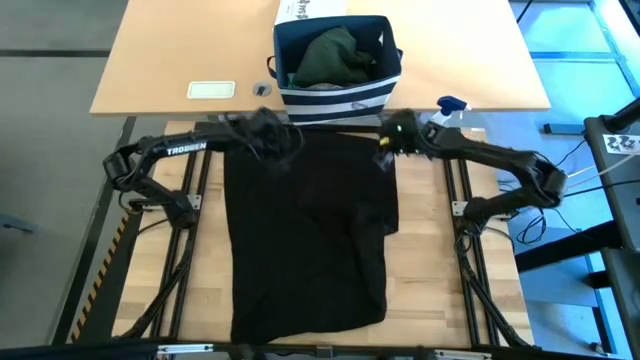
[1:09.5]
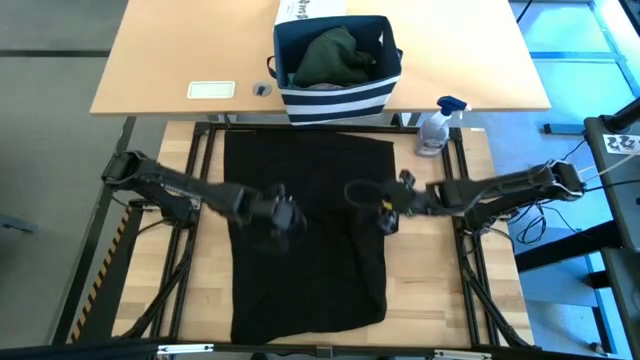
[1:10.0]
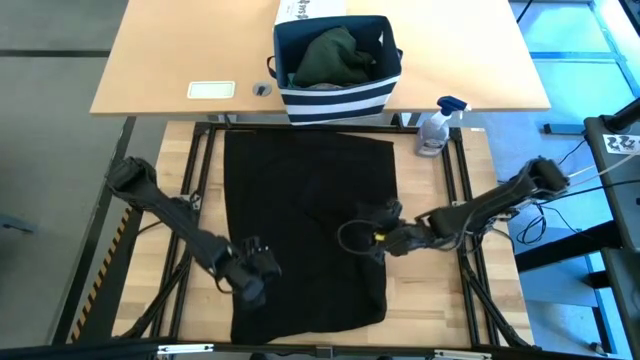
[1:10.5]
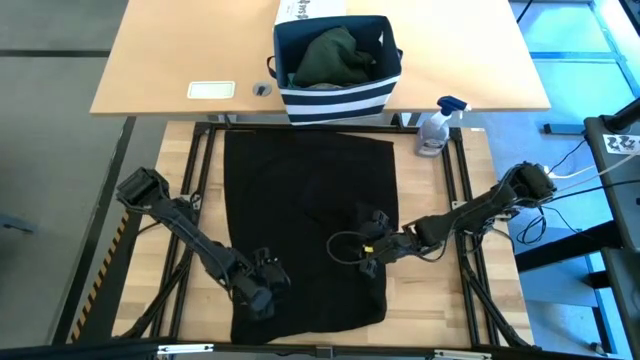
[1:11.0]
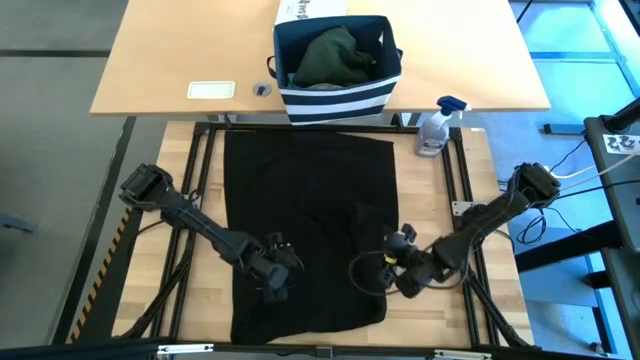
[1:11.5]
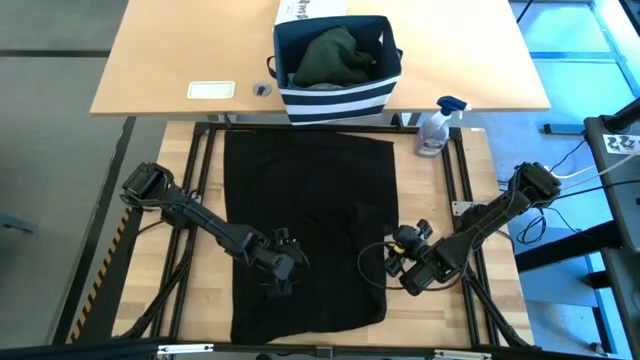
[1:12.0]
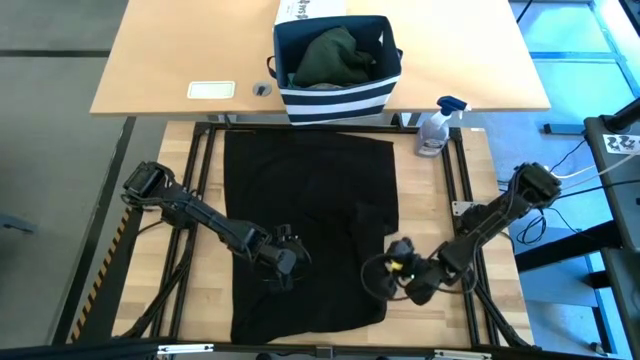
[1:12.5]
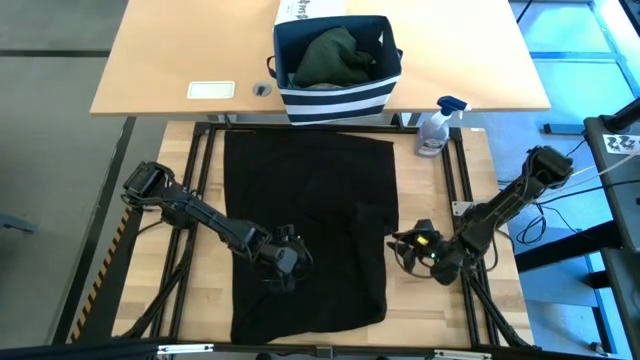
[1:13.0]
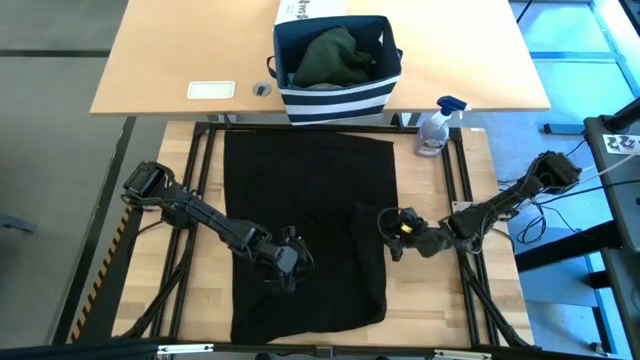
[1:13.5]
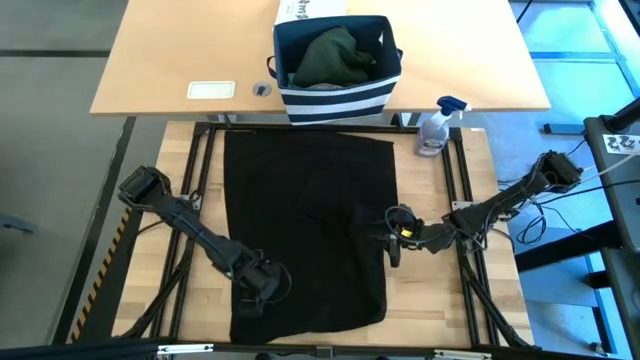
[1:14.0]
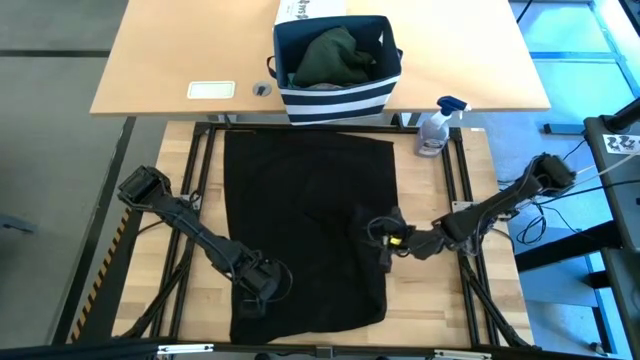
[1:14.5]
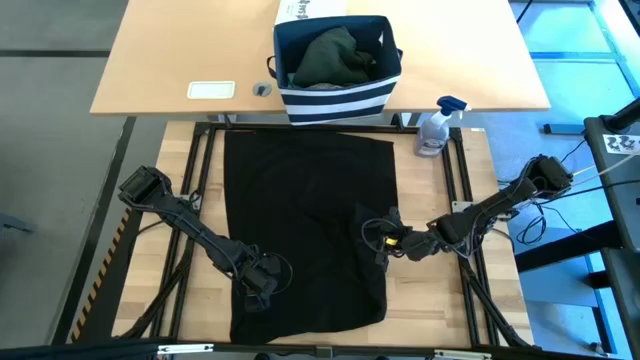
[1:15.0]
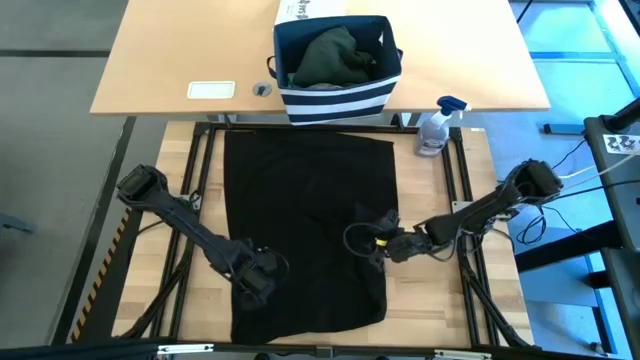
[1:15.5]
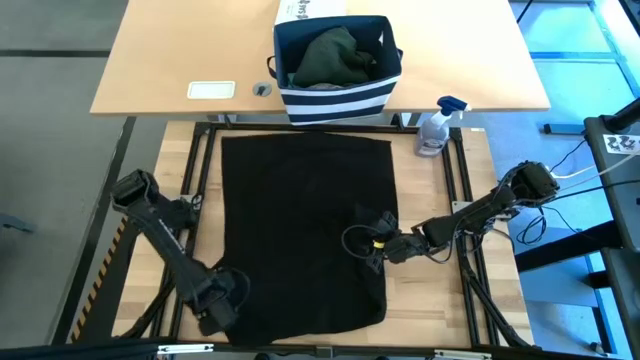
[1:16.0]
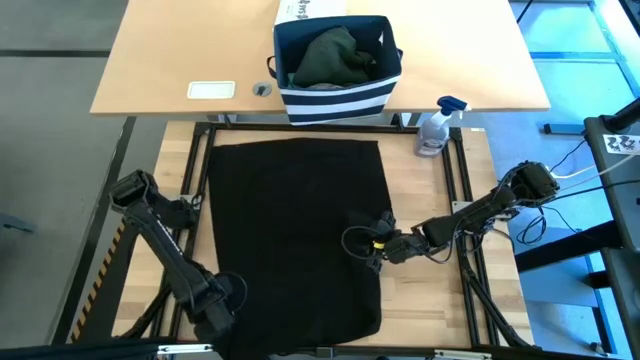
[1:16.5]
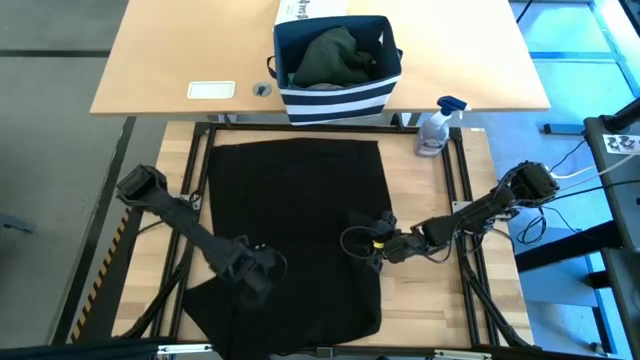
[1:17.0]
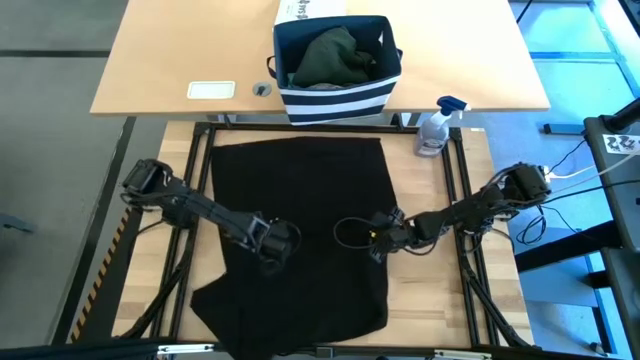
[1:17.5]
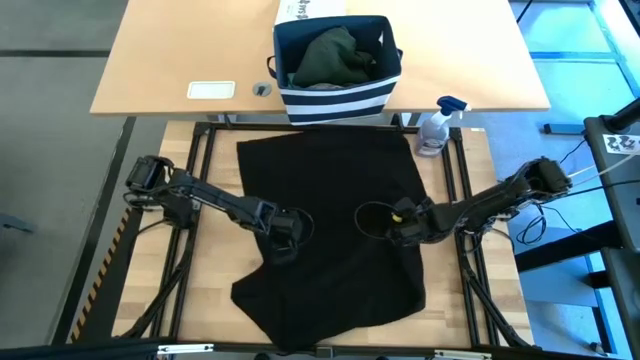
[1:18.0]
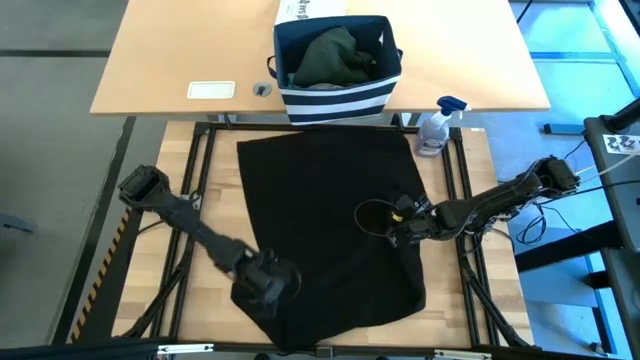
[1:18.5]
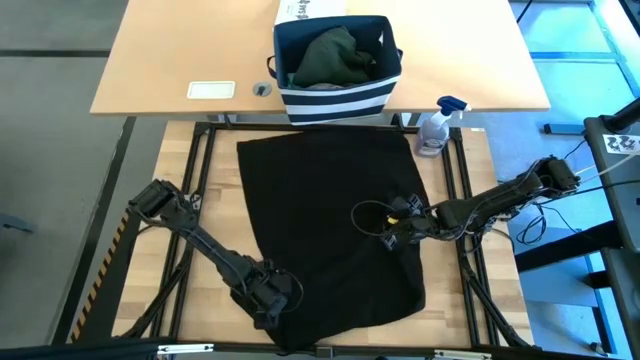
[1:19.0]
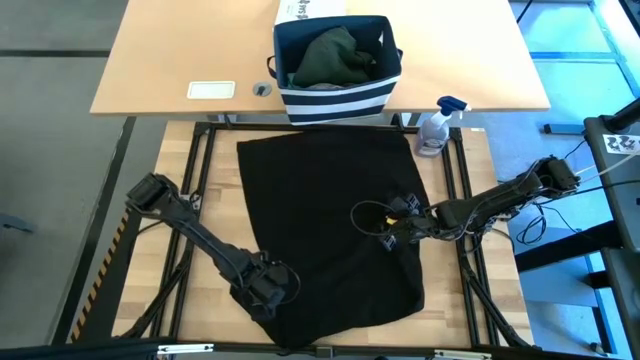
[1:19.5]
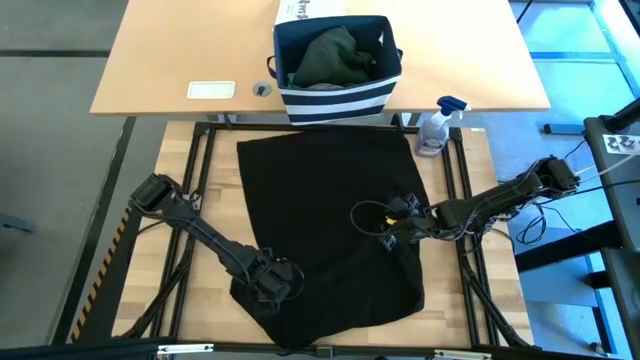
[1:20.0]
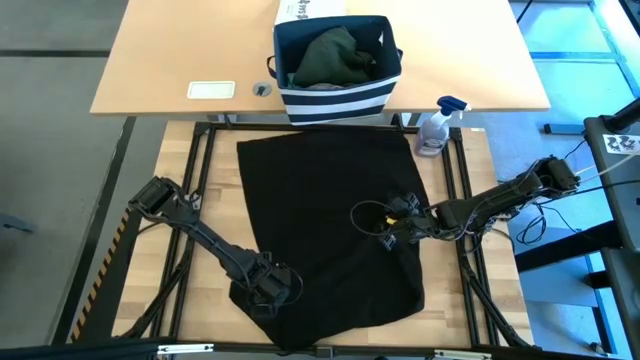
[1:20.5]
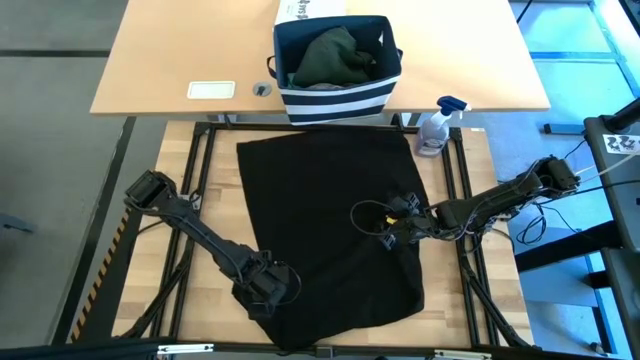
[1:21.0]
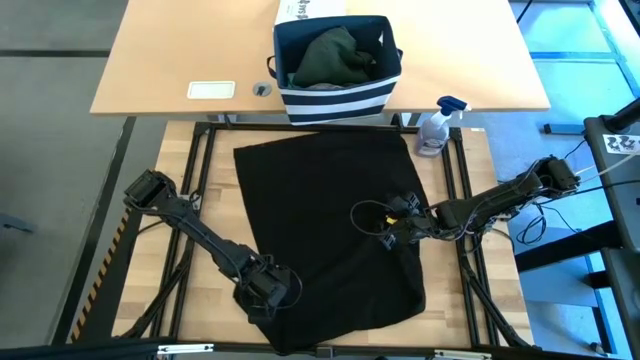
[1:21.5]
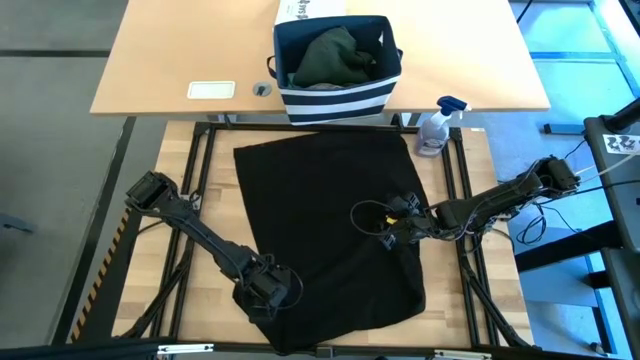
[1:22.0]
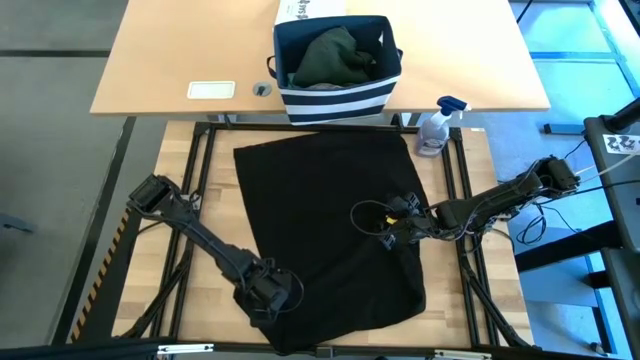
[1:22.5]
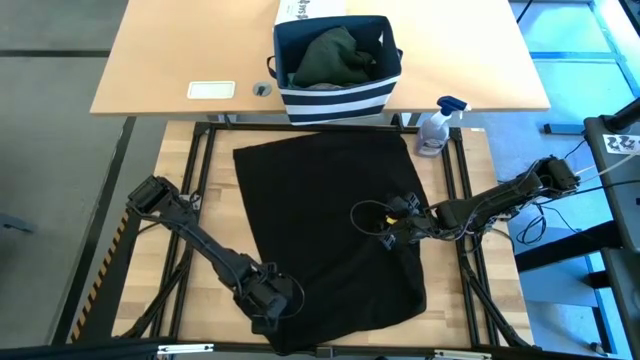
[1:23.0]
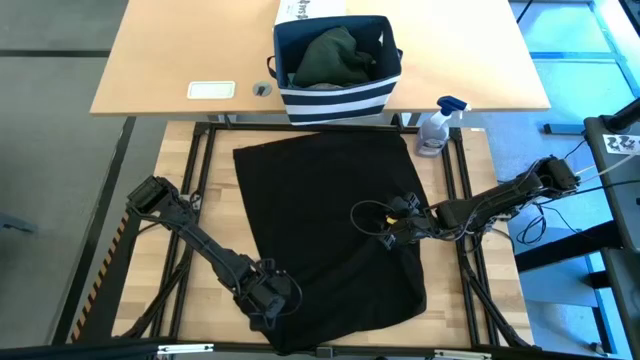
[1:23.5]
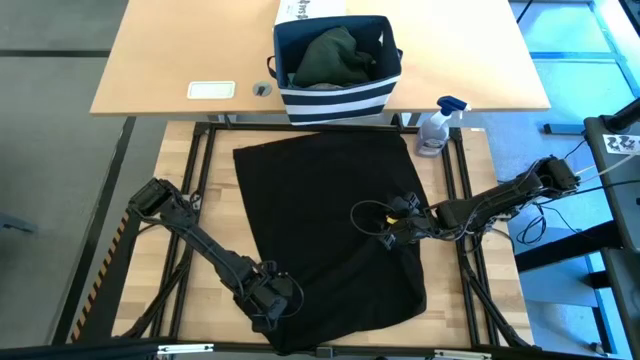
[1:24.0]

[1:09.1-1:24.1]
Task: Fold Laundry from Bin
Fold the black shirt

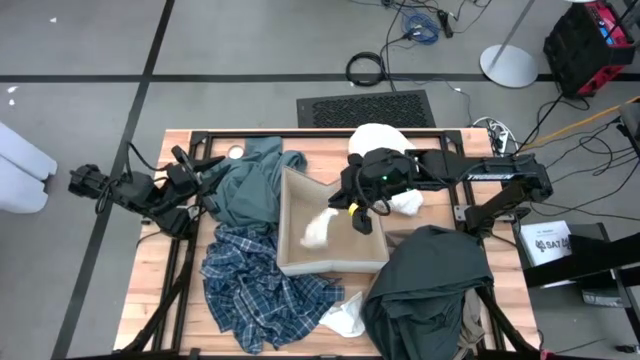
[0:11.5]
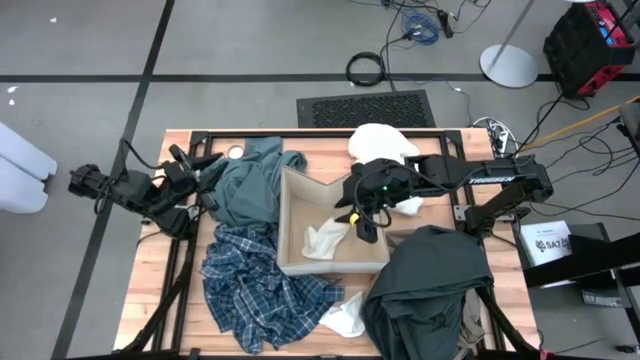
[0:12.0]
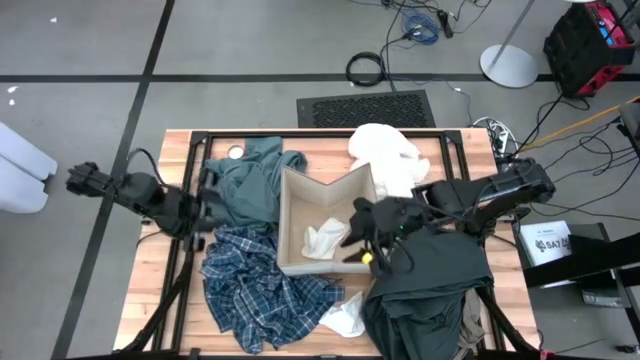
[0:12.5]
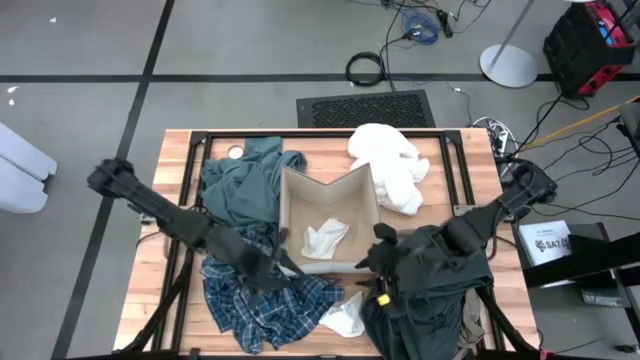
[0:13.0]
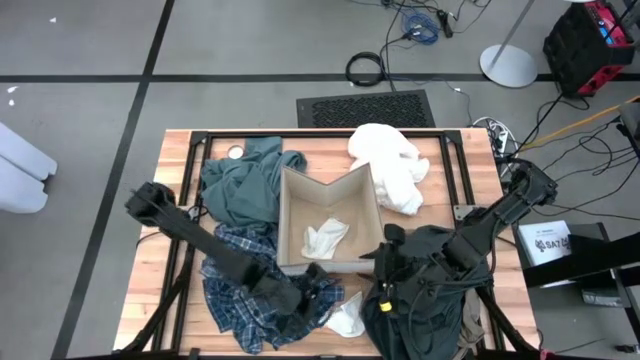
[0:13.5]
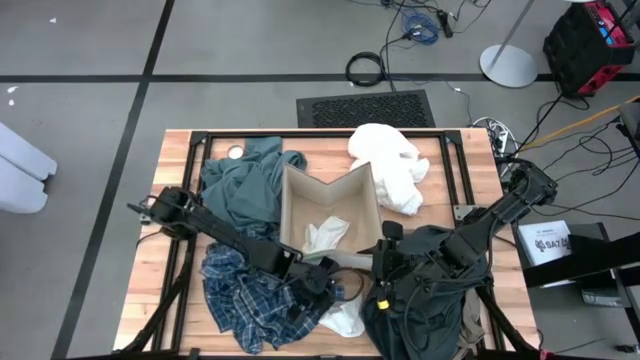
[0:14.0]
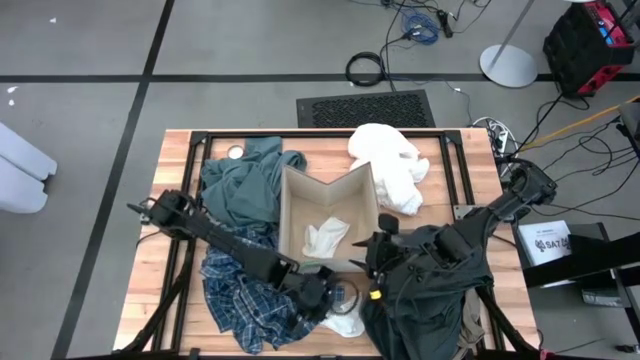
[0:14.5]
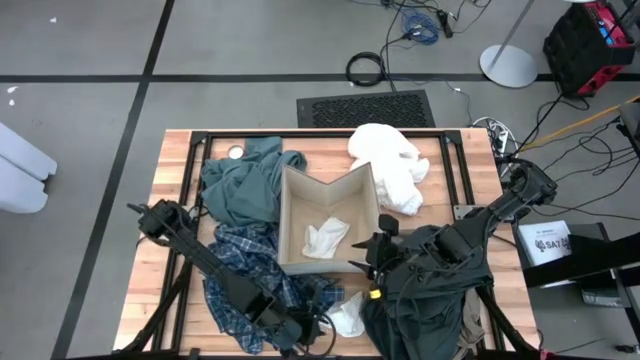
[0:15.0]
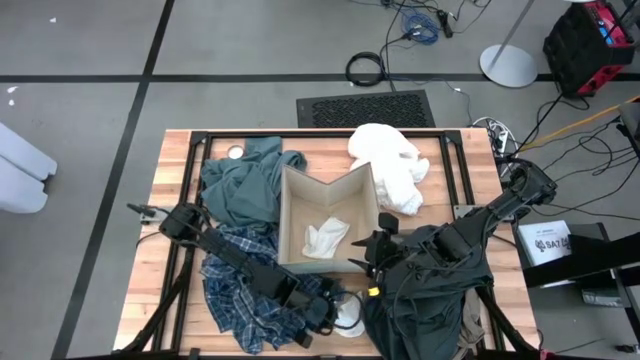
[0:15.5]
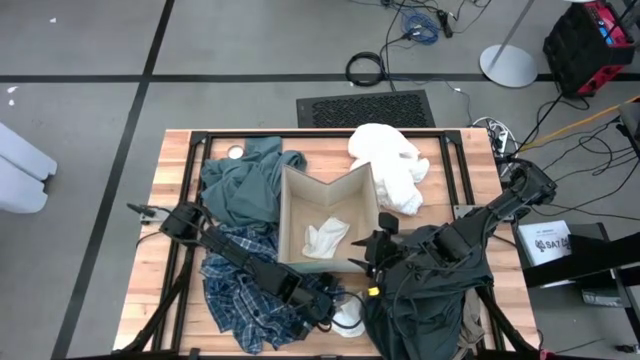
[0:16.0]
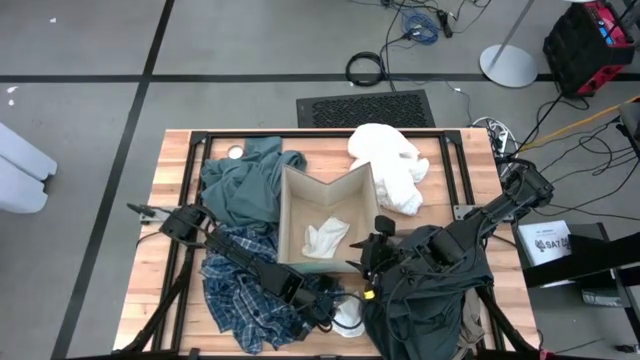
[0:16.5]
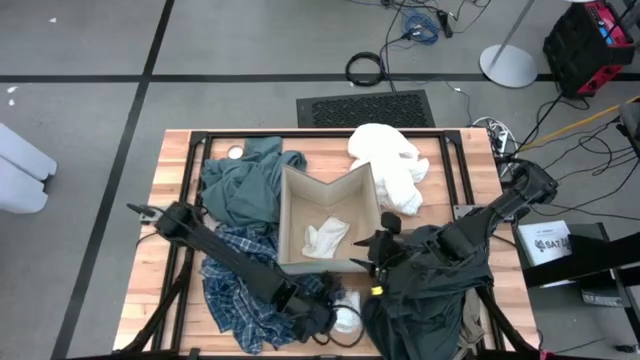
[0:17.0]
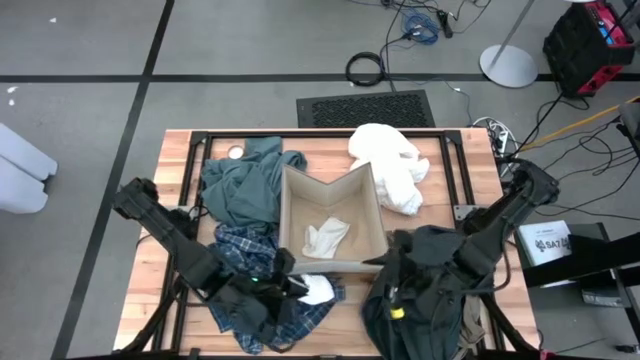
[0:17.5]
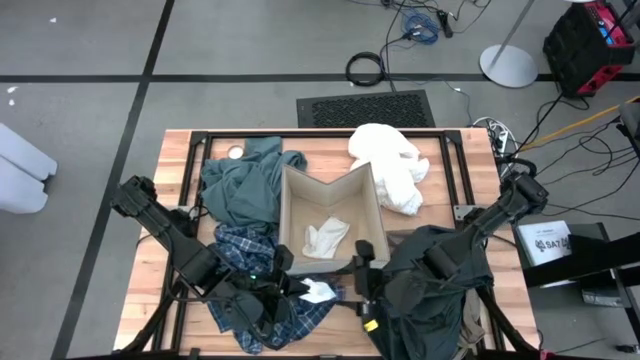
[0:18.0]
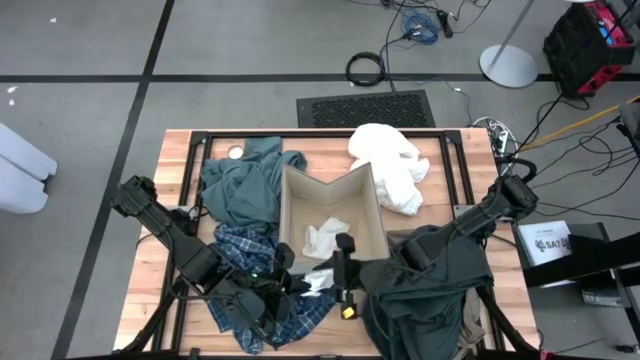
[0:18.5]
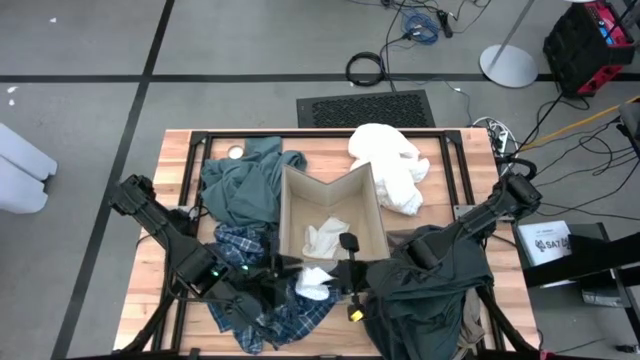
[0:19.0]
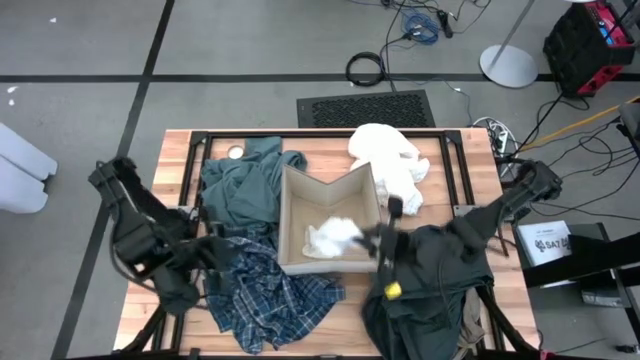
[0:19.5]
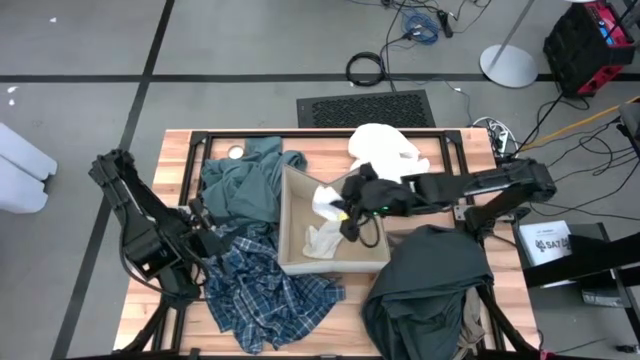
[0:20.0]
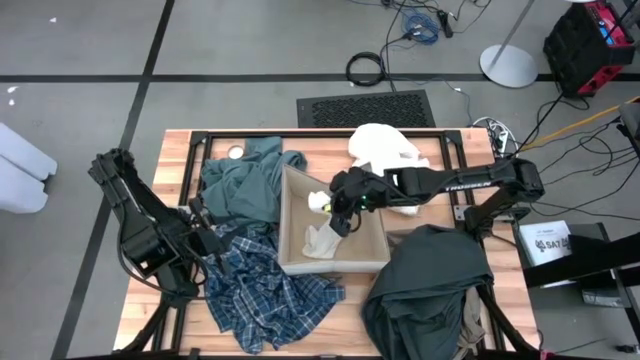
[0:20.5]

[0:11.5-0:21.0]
Task: Sort clothes
Put the white sock into the laundry organizer
